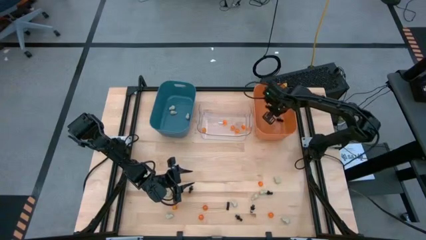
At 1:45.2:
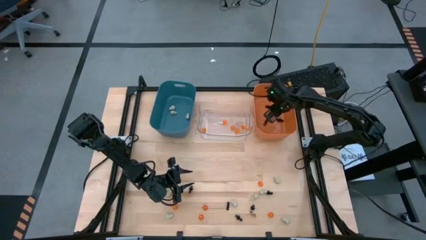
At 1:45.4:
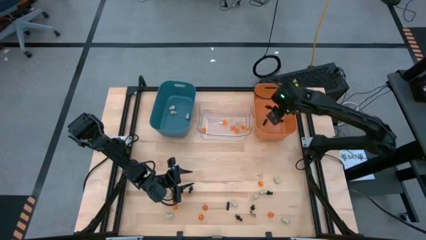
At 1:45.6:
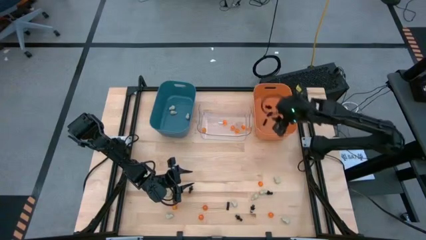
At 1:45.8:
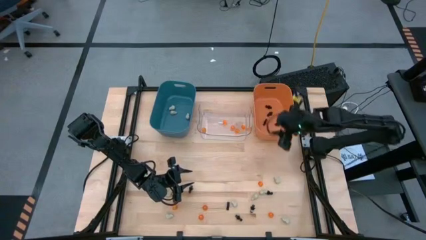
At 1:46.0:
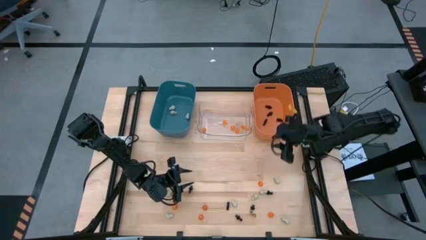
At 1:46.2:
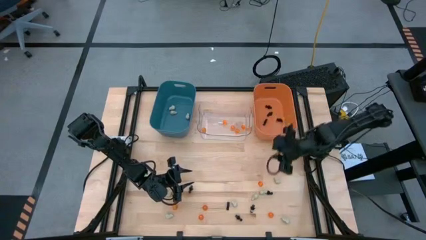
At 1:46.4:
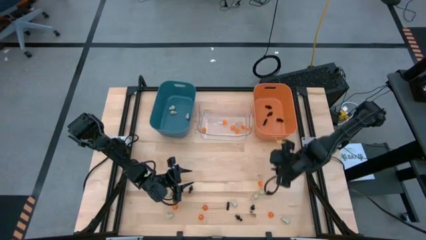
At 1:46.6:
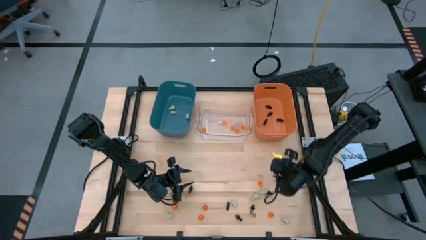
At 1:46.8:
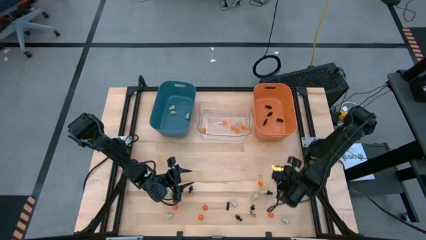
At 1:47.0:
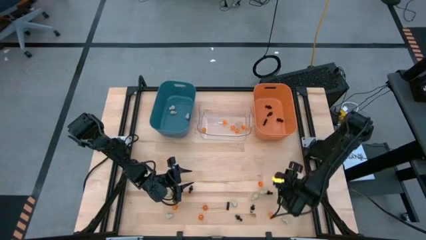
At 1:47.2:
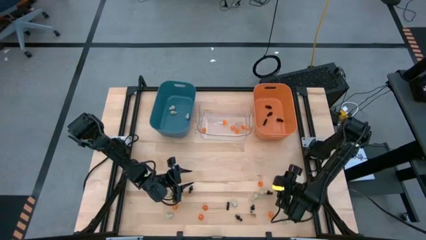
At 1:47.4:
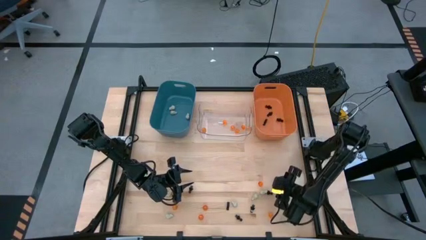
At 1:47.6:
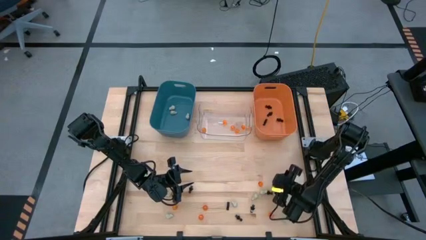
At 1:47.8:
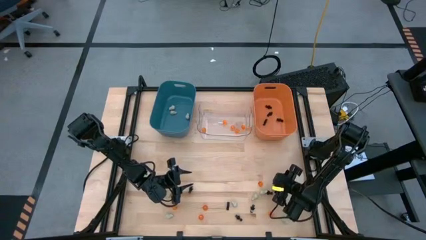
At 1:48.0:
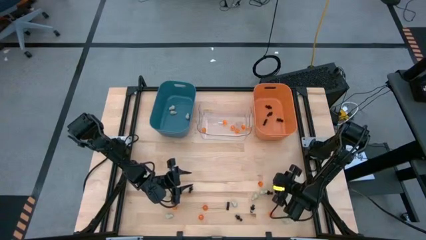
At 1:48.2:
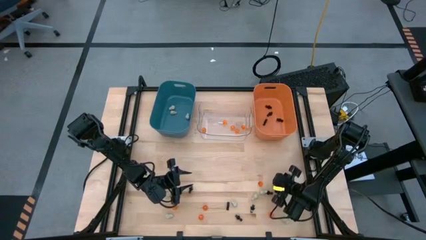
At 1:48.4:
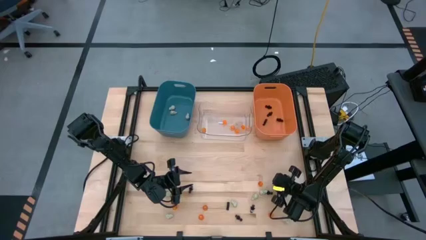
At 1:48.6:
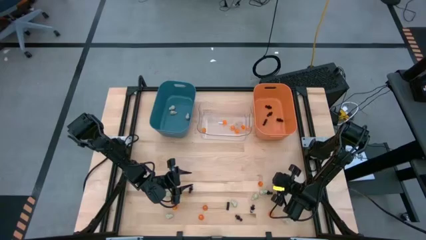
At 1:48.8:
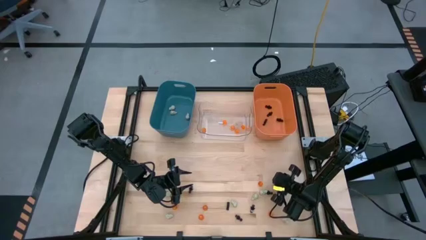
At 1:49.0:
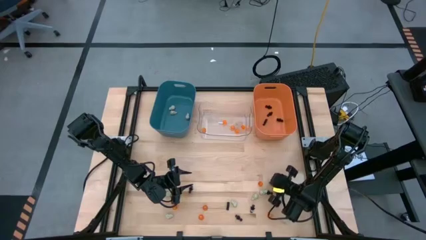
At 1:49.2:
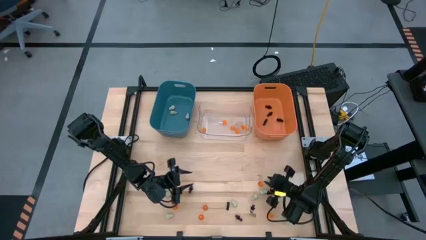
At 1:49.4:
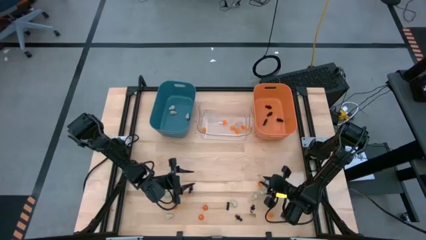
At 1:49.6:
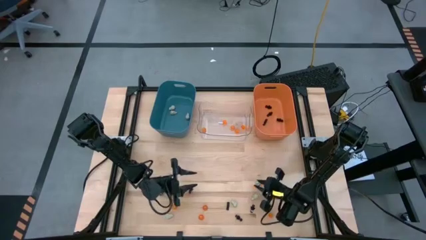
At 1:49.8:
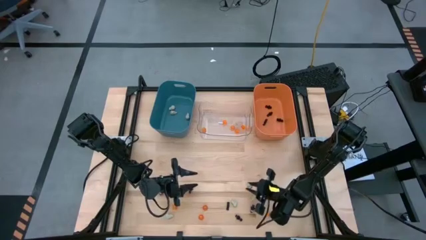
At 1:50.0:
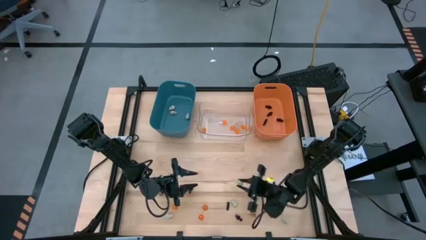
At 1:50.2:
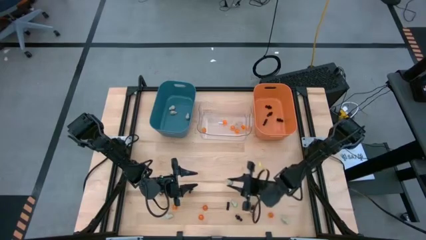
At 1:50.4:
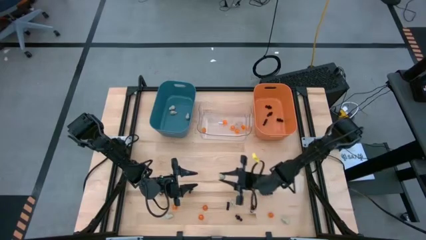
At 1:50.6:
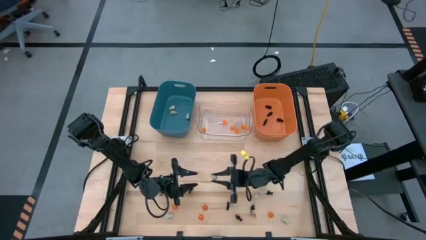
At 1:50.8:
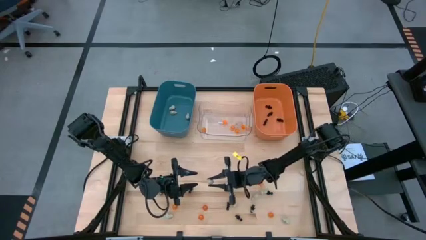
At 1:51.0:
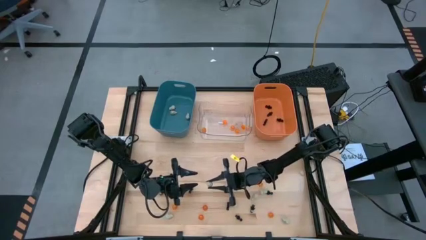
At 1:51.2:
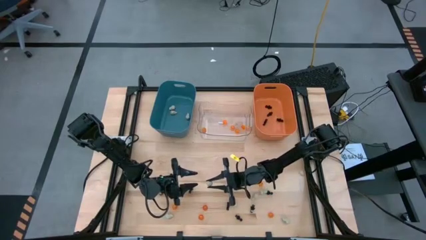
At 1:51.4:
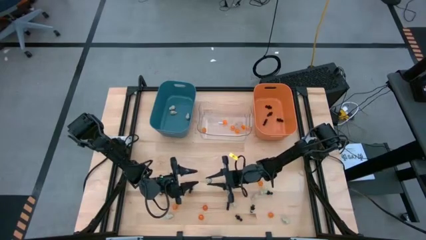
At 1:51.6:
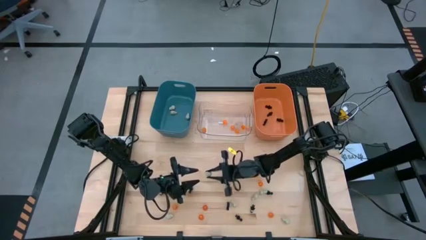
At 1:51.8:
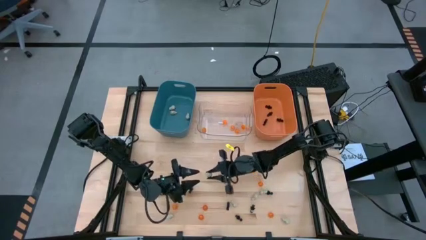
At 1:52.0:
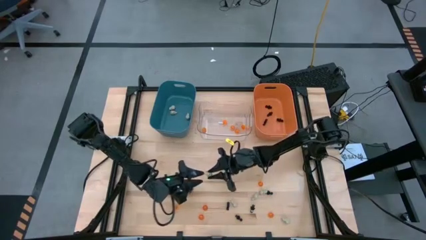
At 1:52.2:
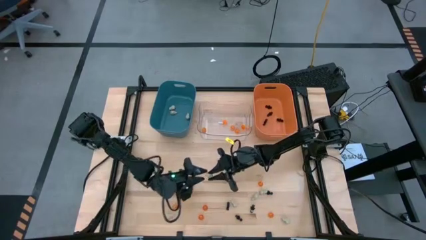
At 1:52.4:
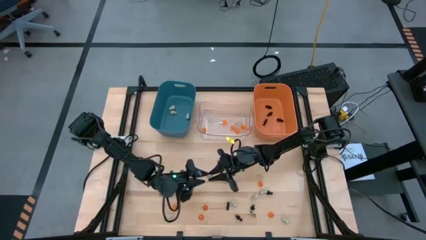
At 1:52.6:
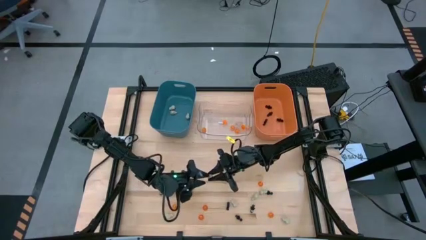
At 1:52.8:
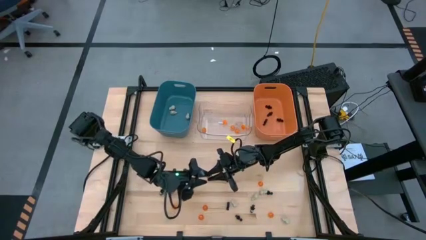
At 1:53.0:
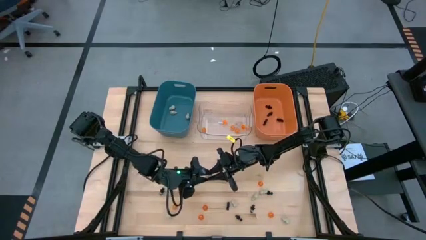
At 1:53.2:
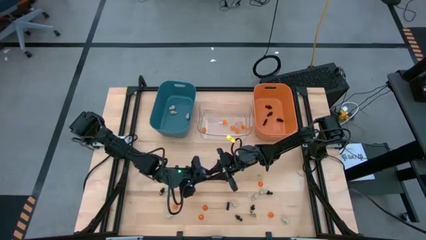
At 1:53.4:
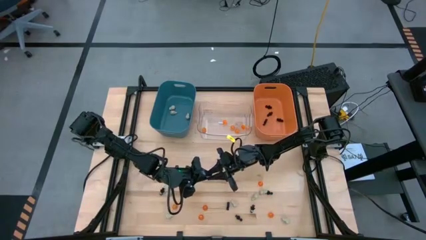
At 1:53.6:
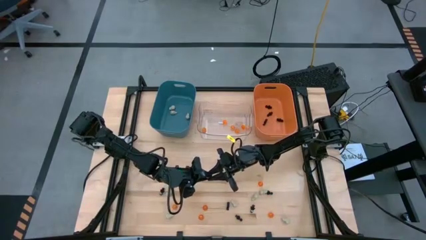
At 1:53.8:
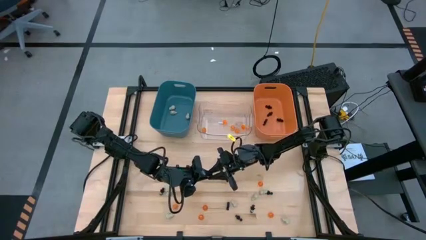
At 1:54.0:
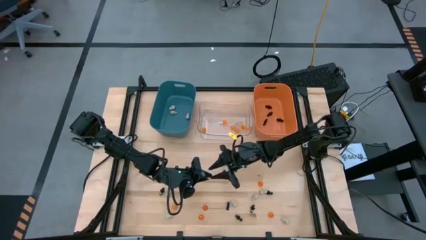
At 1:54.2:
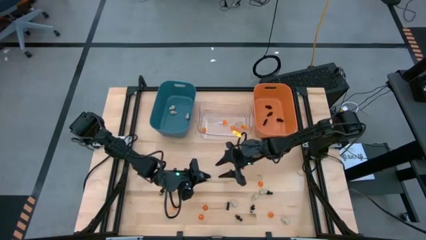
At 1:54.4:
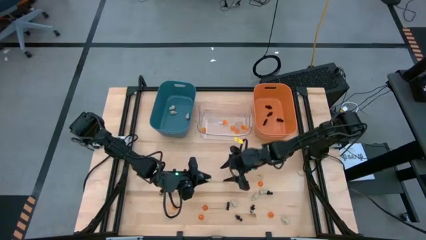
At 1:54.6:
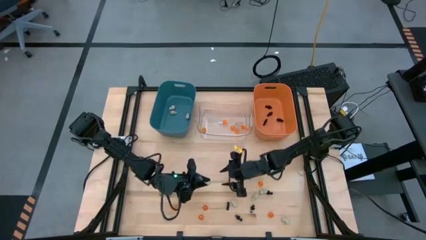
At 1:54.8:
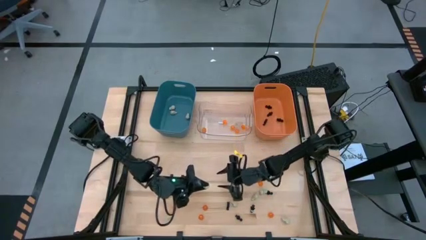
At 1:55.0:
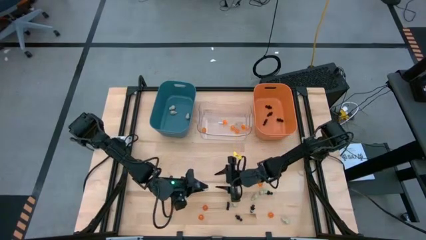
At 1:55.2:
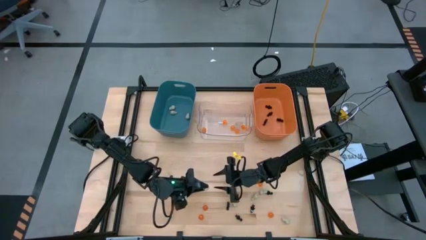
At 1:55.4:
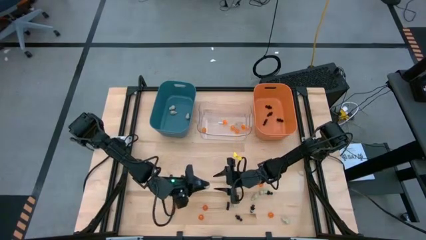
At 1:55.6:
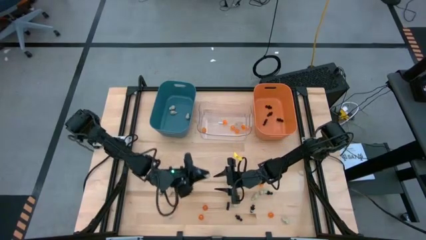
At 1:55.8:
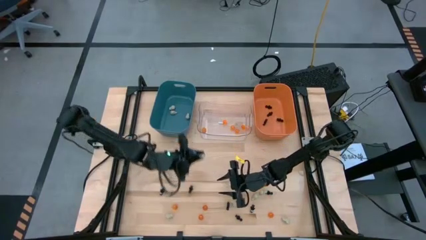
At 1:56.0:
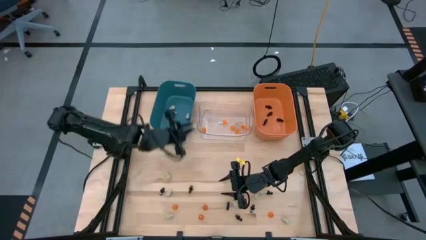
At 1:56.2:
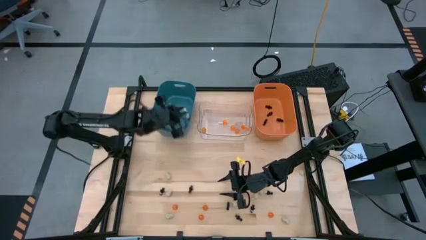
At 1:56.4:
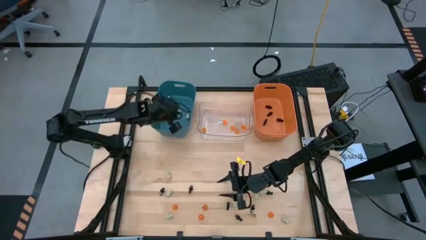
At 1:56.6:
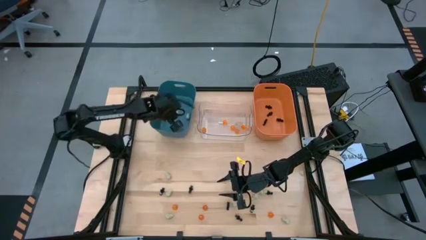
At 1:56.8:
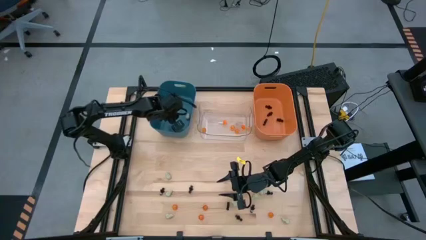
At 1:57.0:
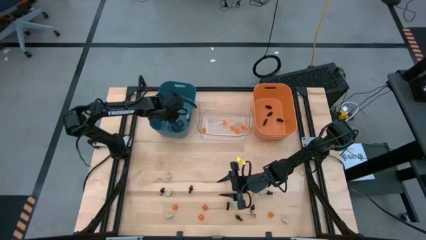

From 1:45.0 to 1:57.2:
Task: Sort Halloween decoration
Put the white skull toy into the blue bin

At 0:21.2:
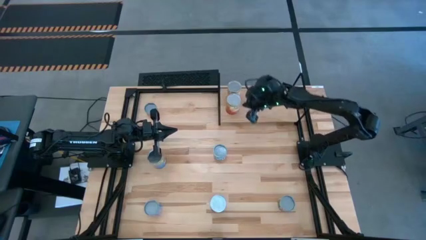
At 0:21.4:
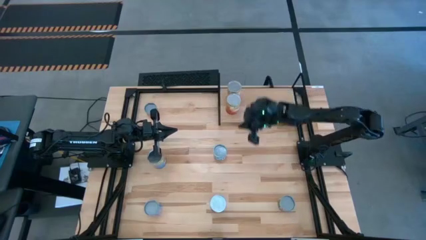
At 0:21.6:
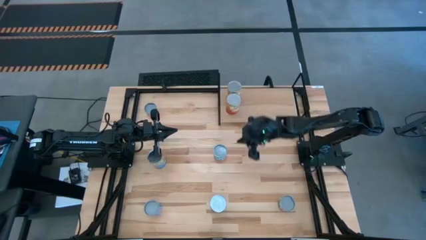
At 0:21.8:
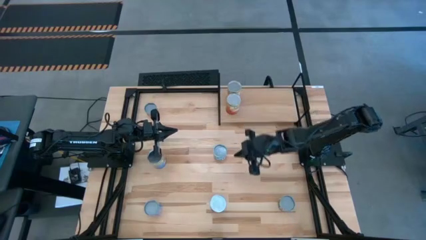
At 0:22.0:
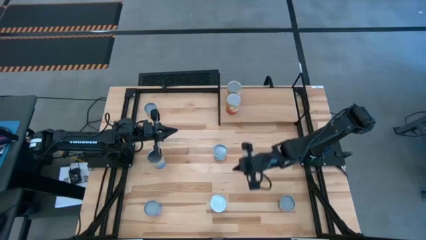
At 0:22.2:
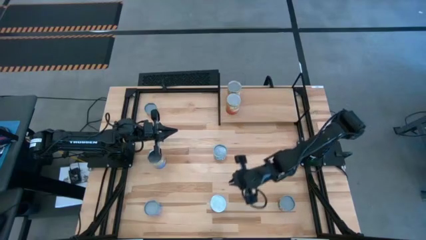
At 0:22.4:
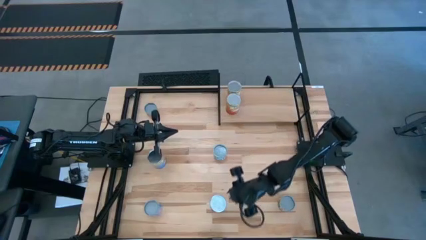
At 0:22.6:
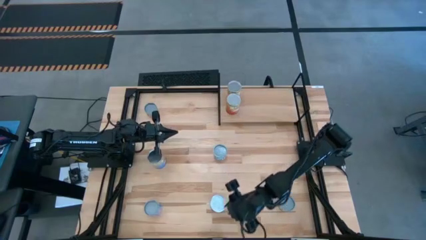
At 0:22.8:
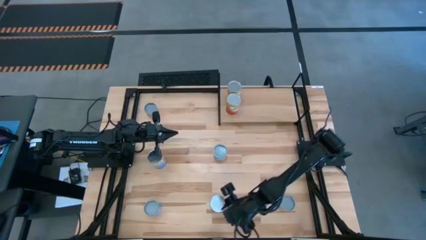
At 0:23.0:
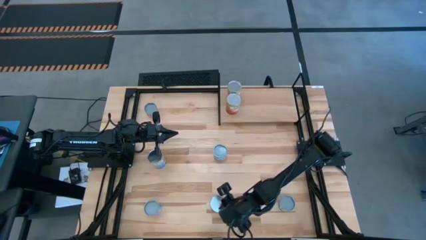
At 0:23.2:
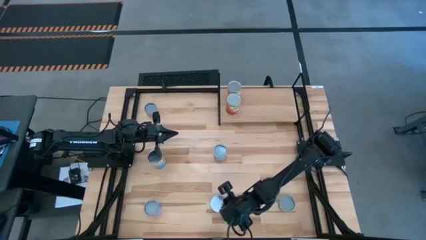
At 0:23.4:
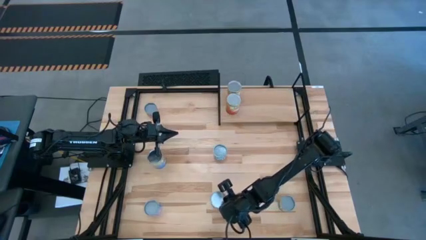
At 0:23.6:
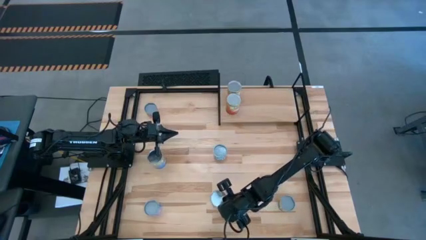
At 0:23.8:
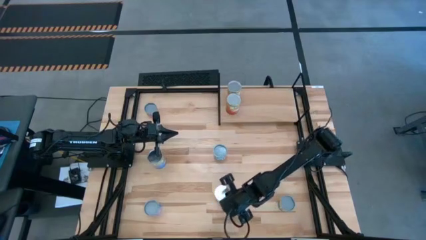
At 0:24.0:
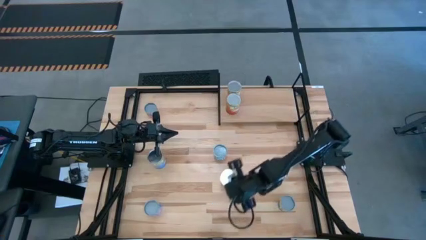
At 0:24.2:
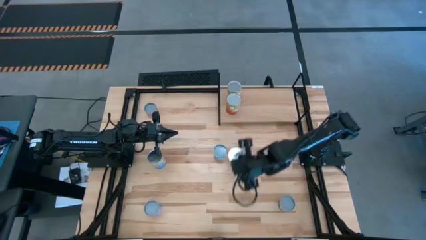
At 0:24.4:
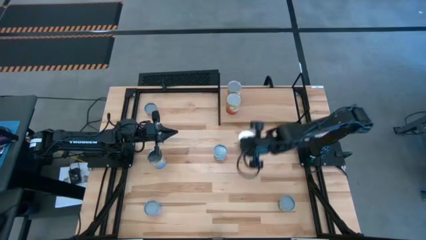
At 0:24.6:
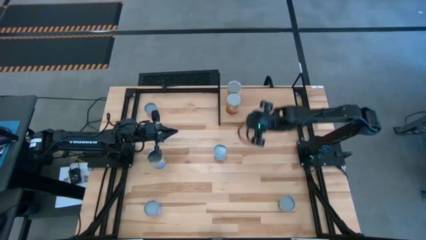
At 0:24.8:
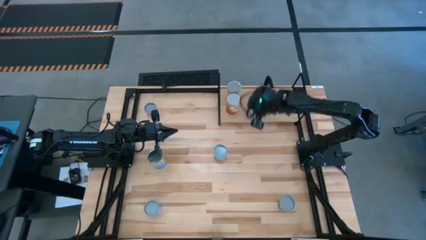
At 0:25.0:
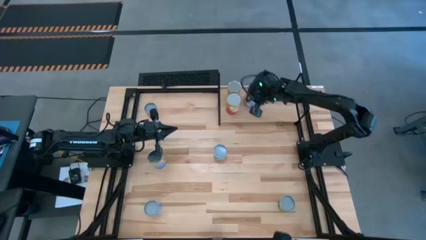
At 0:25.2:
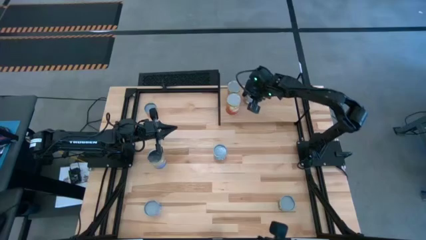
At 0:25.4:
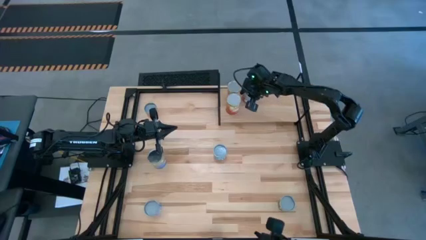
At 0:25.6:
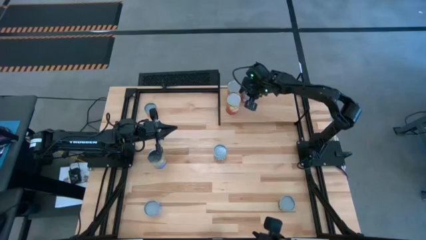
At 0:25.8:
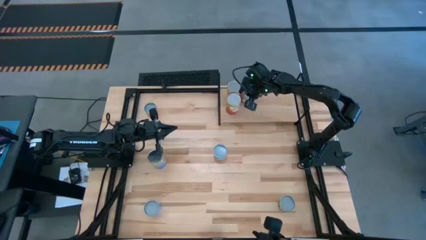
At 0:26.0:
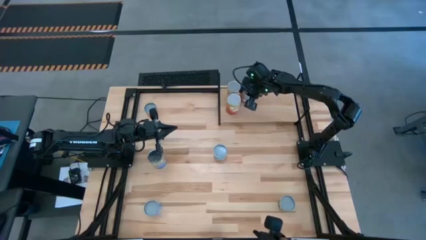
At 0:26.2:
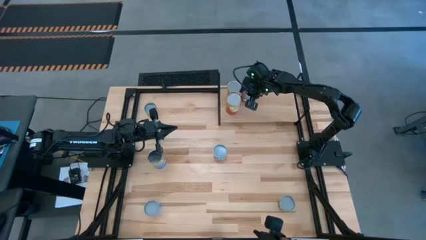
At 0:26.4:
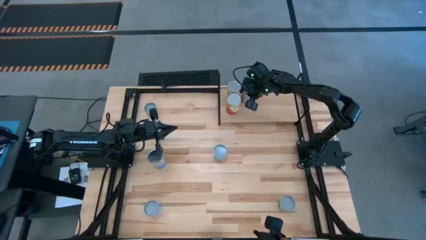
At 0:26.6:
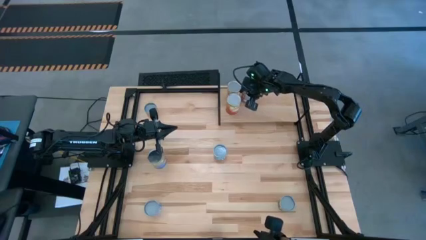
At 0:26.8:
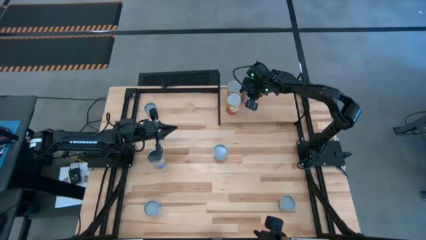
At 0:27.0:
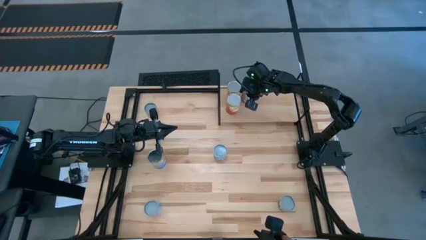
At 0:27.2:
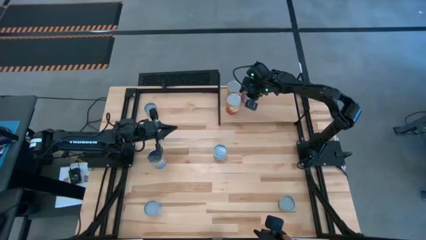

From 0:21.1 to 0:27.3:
Task: Pick and place cans onto a shelf
Put the right canned peaches on the shelf
